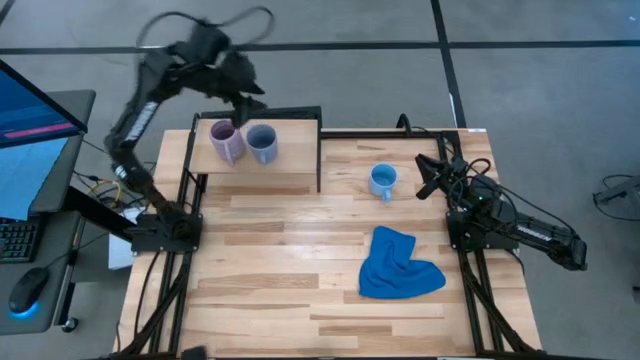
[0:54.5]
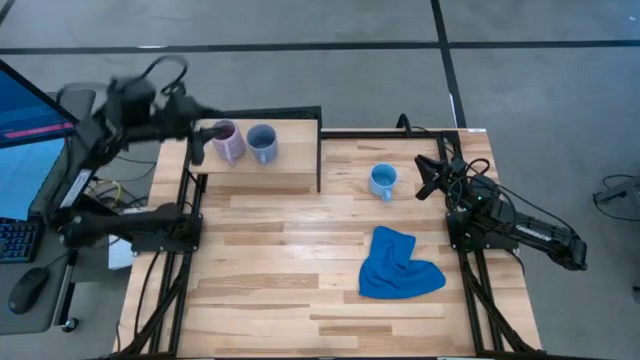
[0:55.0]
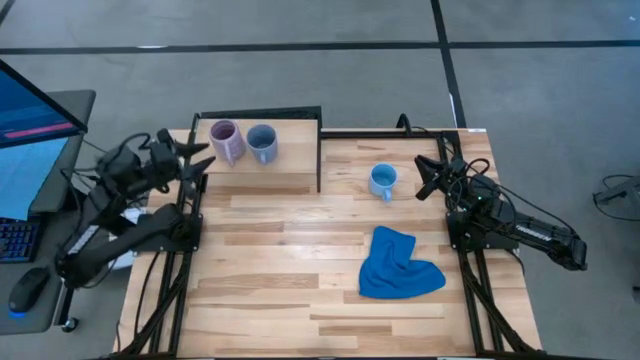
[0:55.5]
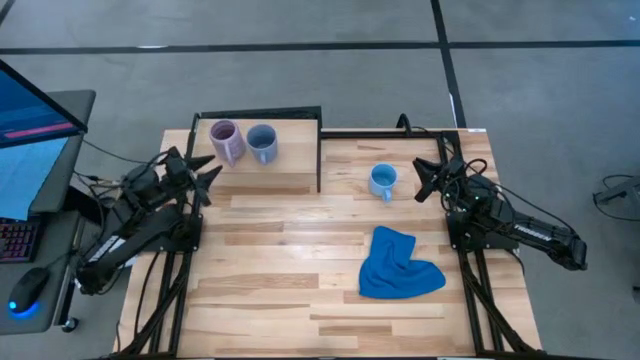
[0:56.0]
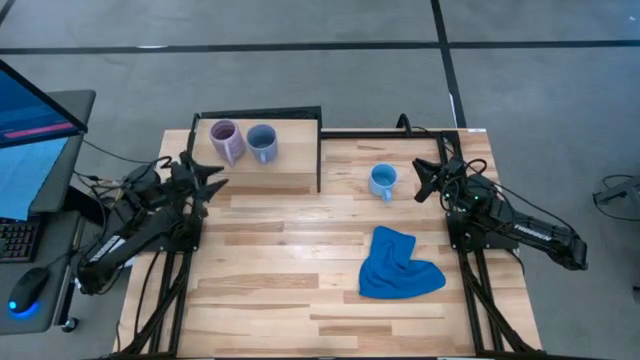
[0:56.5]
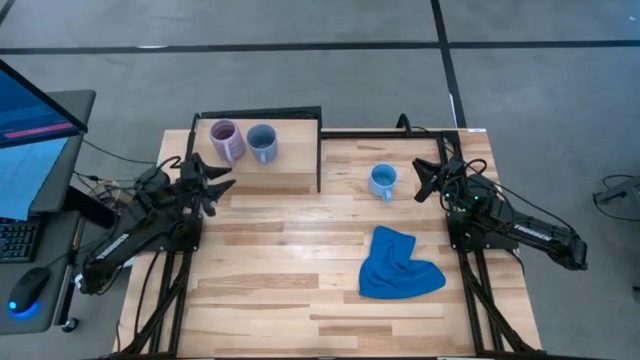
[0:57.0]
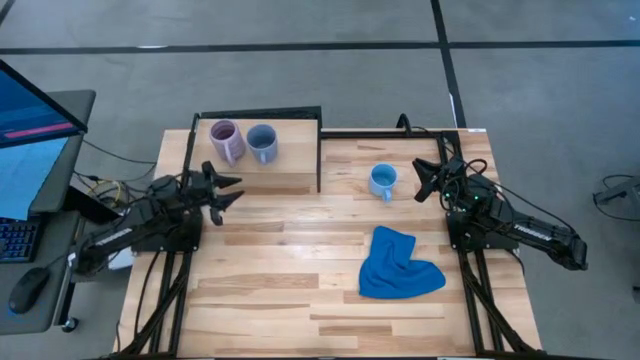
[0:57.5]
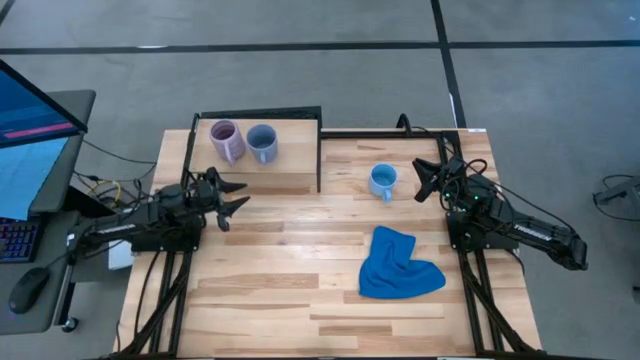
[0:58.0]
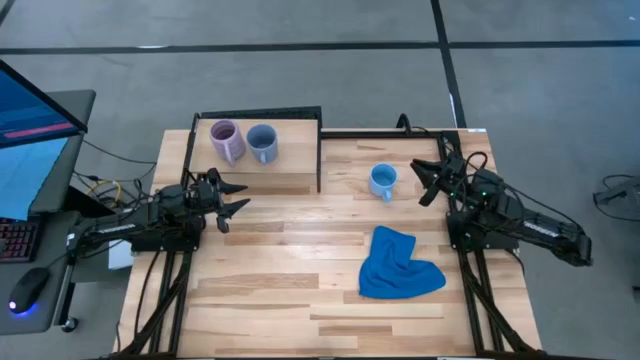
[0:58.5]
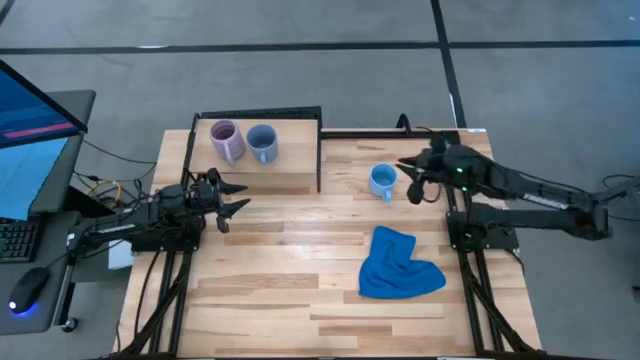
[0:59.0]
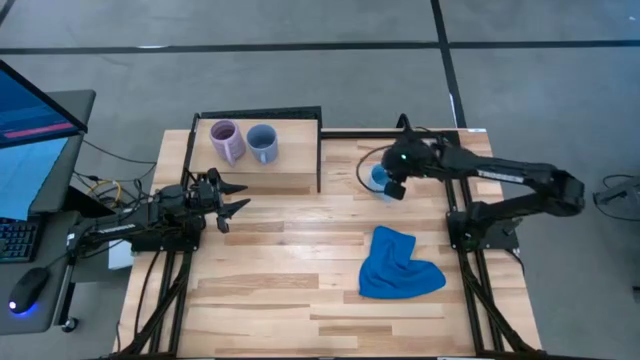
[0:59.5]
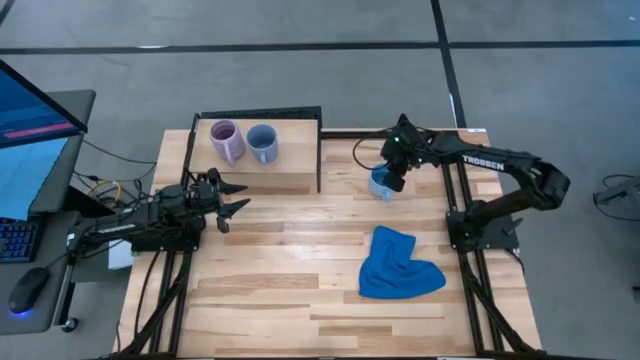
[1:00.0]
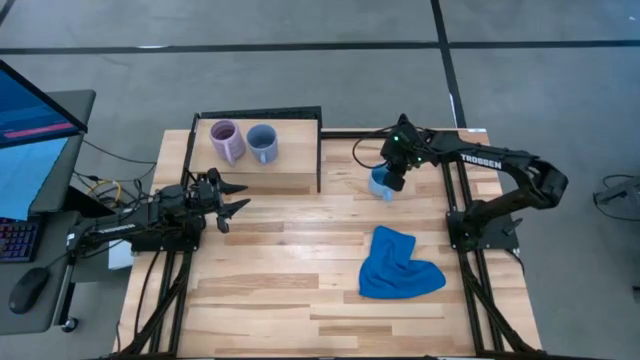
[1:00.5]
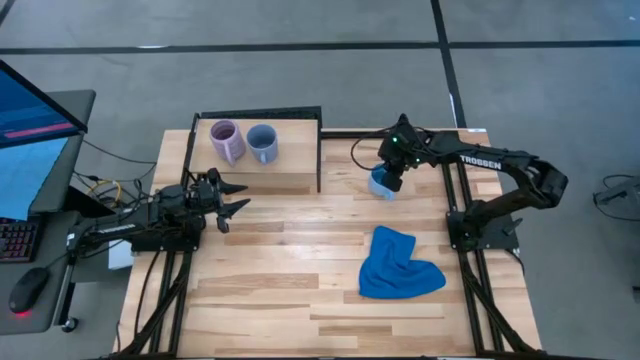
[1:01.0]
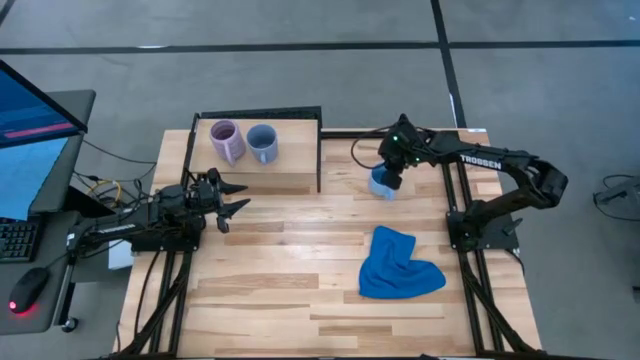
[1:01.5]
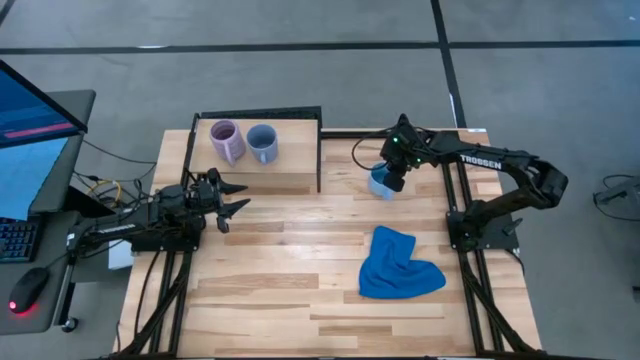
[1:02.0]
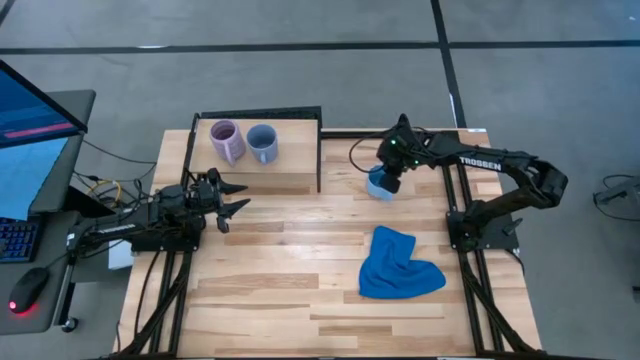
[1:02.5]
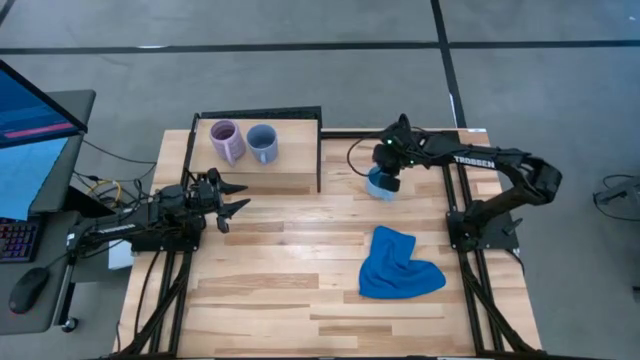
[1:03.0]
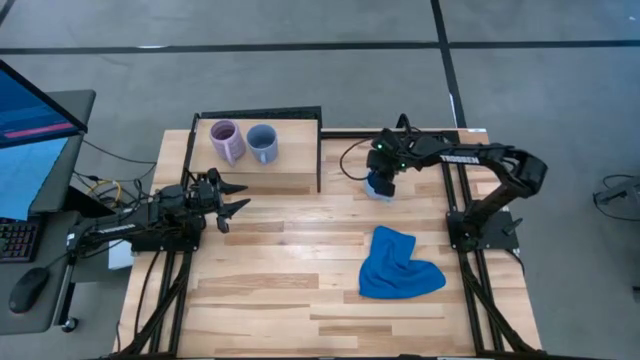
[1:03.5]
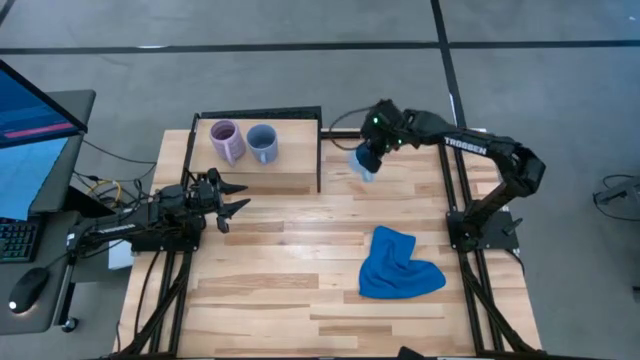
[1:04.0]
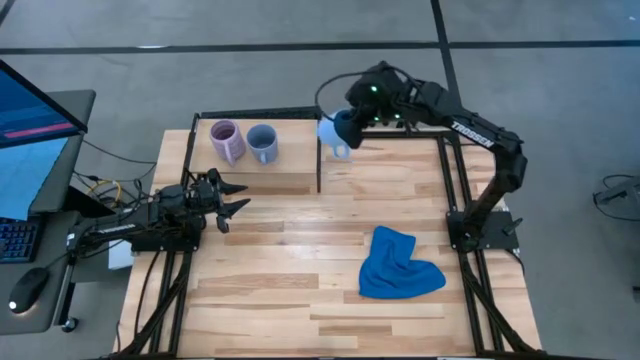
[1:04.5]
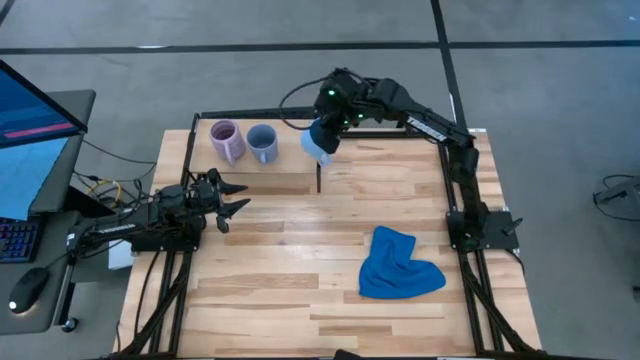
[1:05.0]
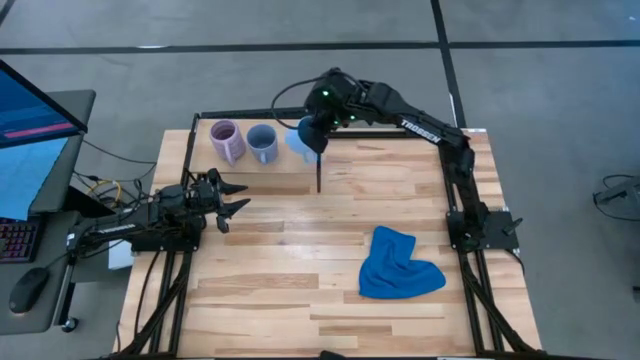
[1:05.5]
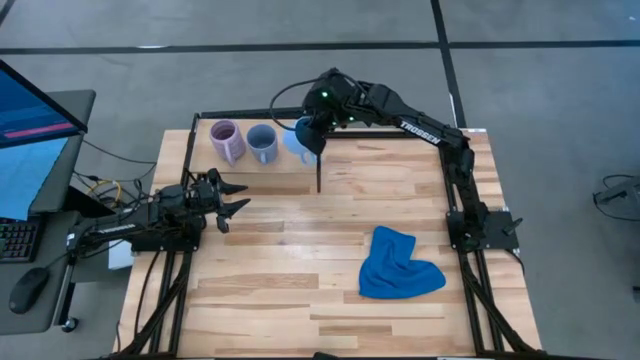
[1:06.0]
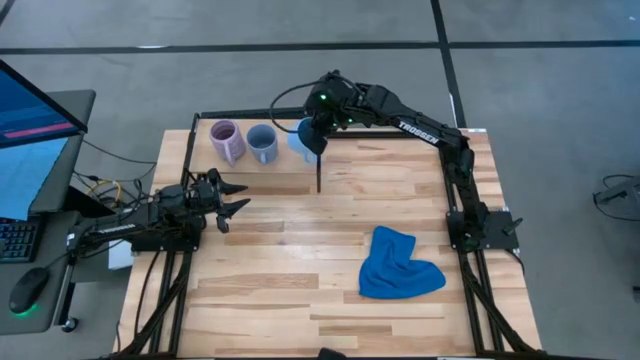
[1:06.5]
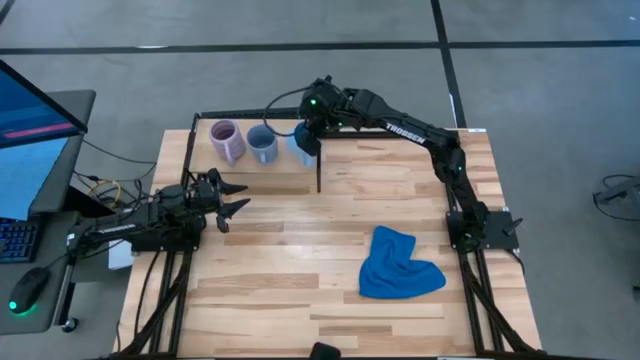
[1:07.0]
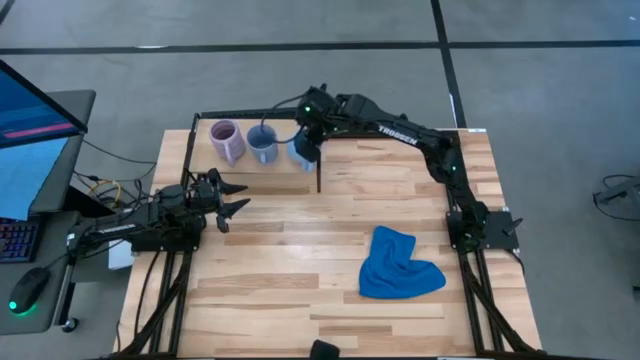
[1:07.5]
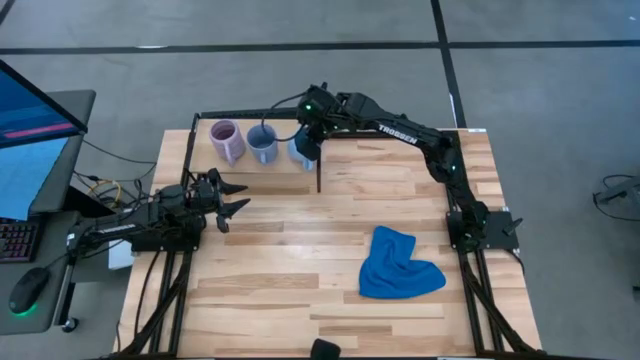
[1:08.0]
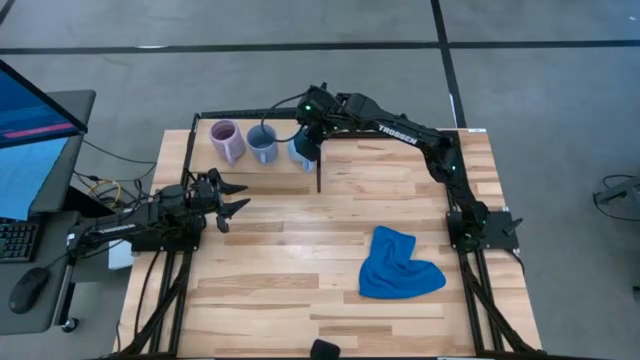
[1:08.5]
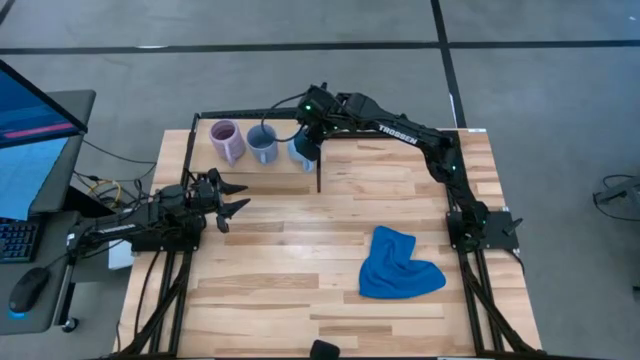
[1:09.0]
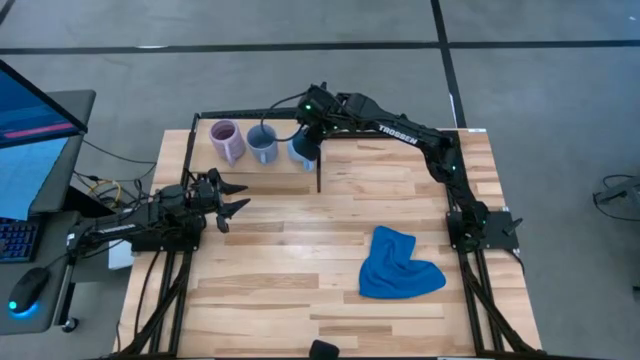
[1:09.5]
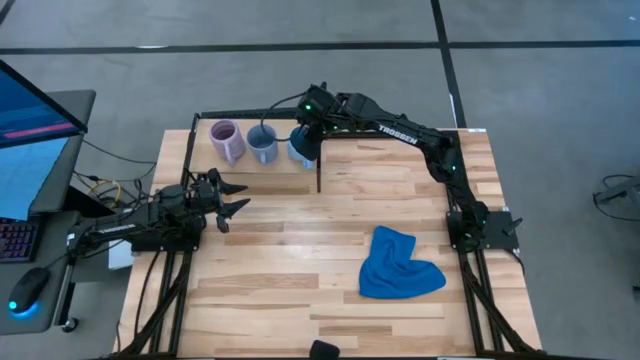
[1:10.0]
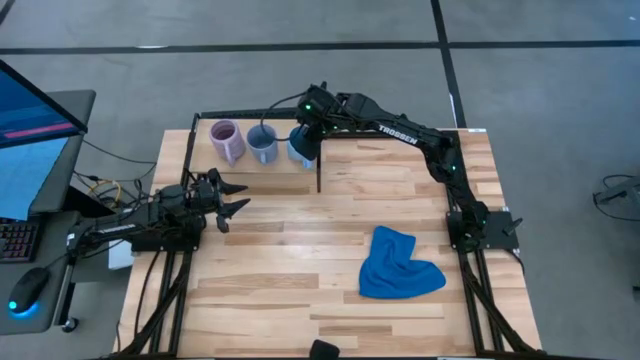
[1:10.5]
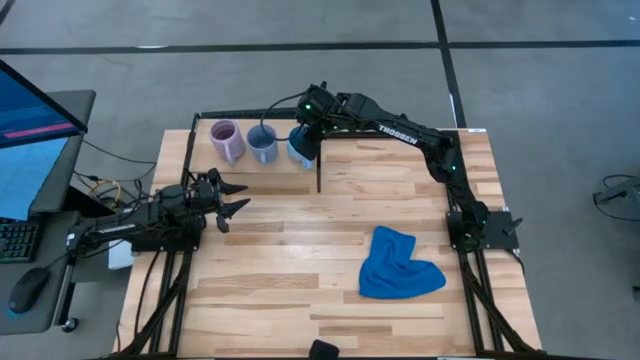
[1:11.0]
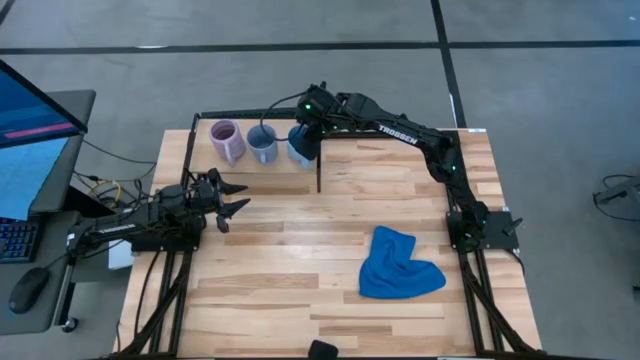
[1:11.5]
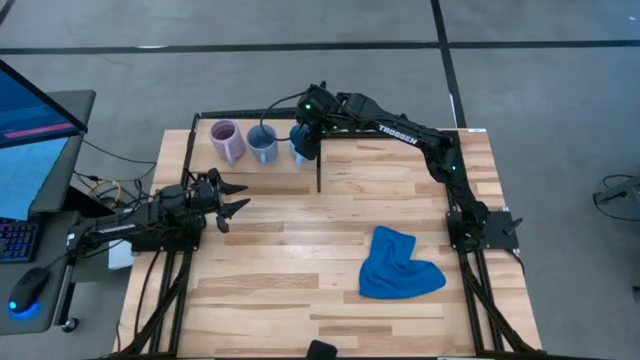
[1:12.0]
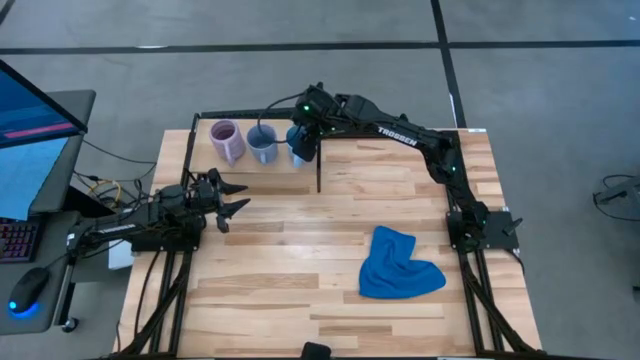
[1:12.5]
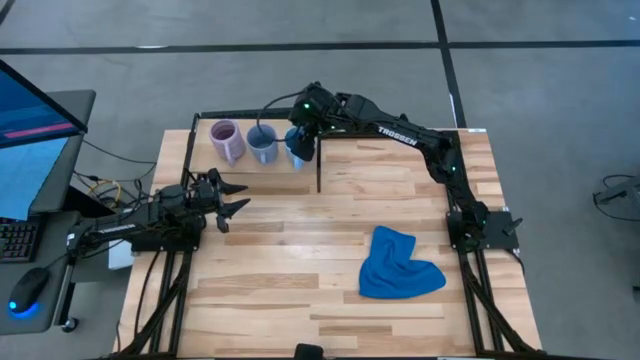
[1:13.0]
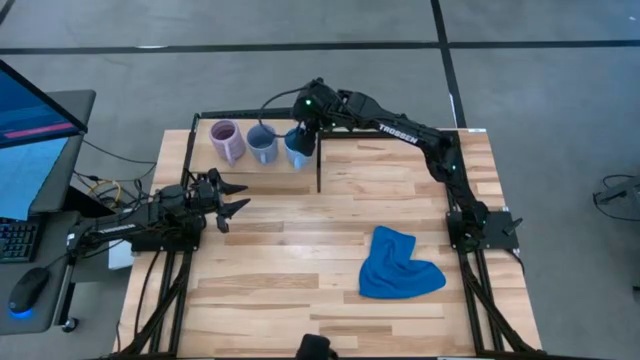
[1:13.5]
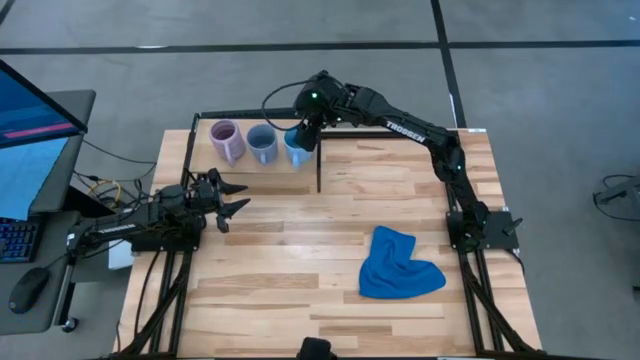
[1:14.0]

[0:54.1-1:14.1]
Task: Stack small to large cups/mugs on shelf
Put the blue cup on the shelf
